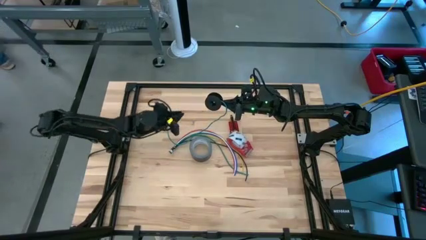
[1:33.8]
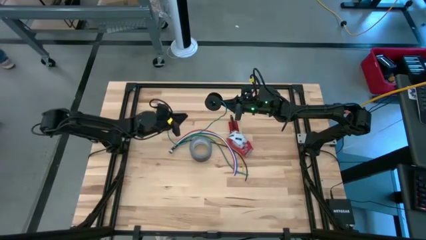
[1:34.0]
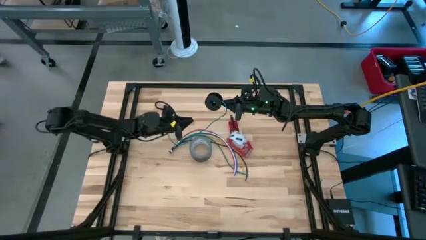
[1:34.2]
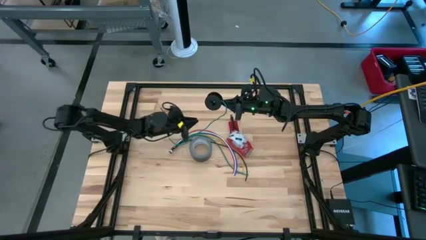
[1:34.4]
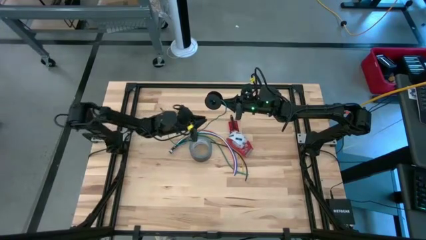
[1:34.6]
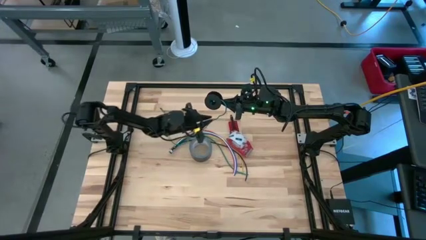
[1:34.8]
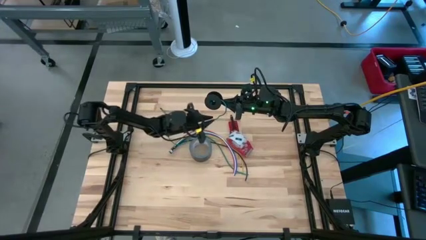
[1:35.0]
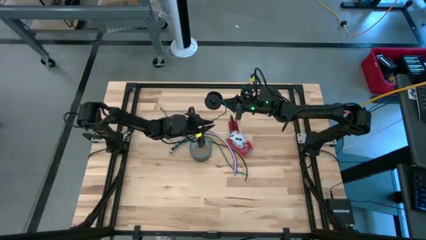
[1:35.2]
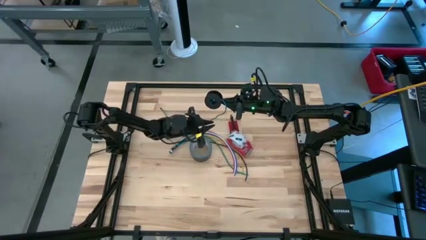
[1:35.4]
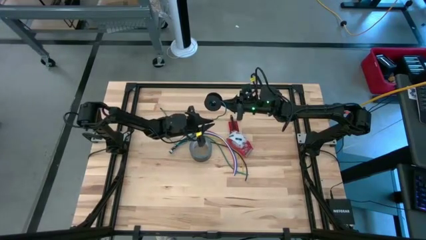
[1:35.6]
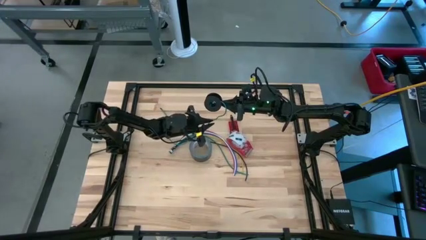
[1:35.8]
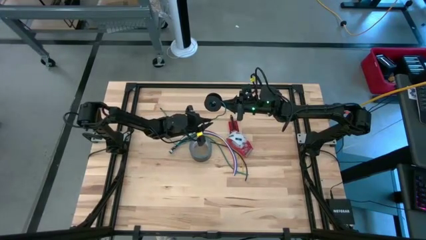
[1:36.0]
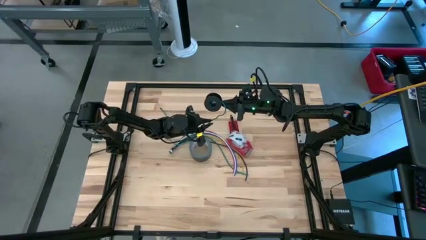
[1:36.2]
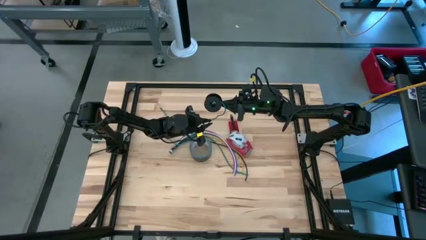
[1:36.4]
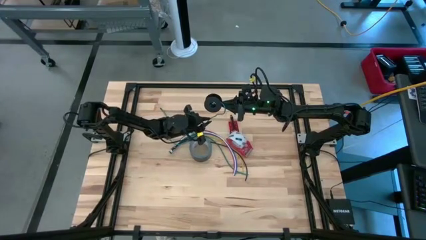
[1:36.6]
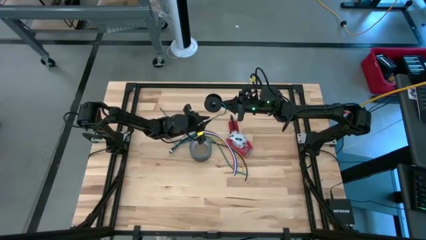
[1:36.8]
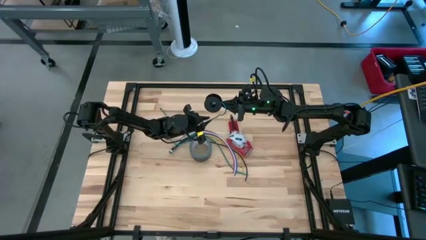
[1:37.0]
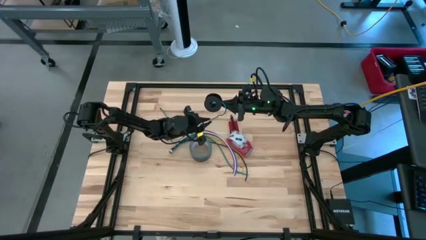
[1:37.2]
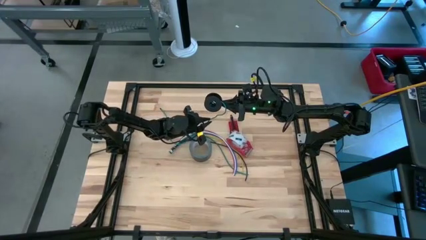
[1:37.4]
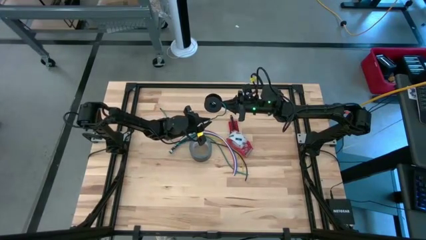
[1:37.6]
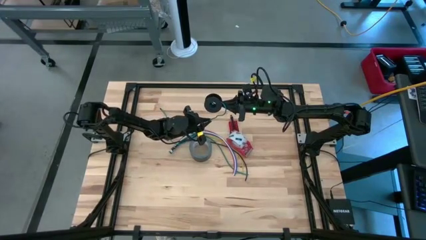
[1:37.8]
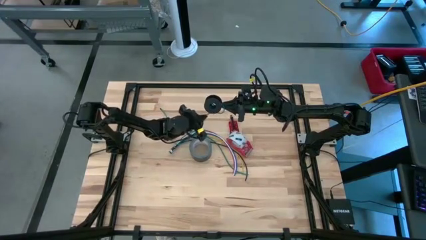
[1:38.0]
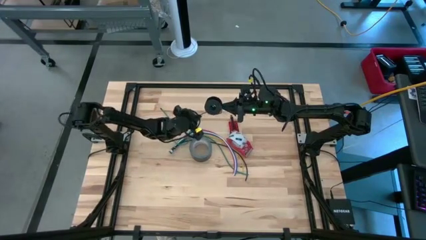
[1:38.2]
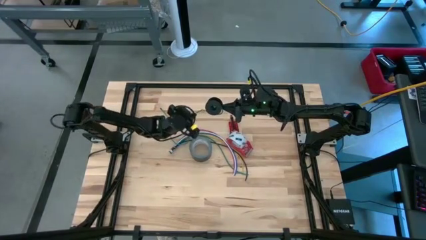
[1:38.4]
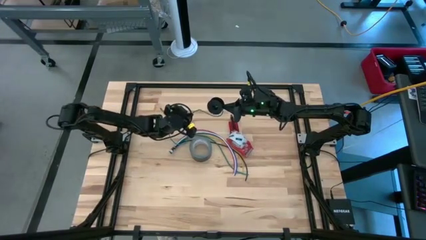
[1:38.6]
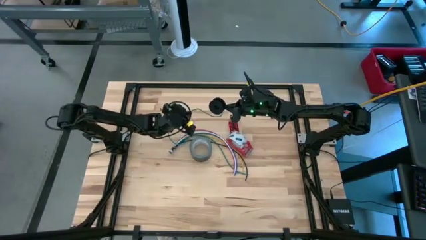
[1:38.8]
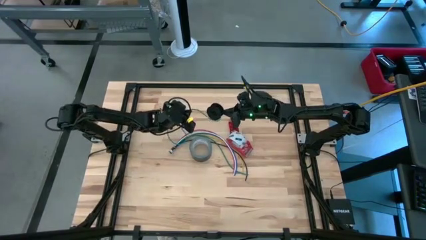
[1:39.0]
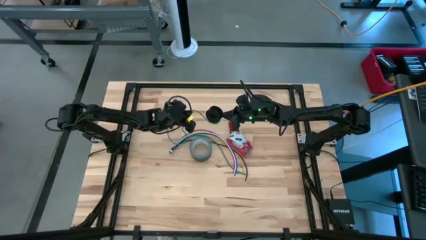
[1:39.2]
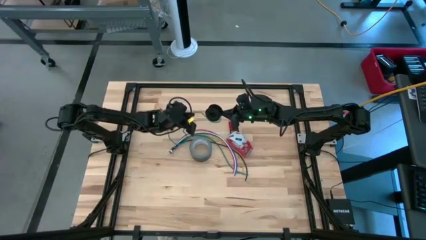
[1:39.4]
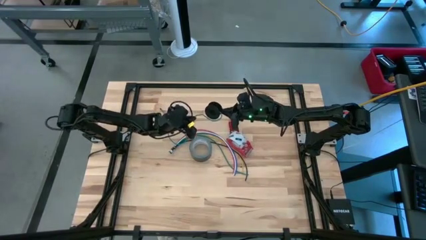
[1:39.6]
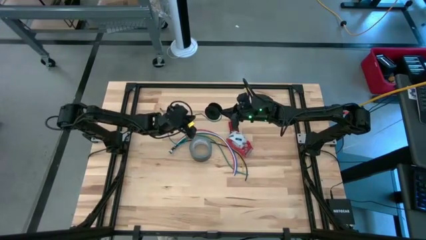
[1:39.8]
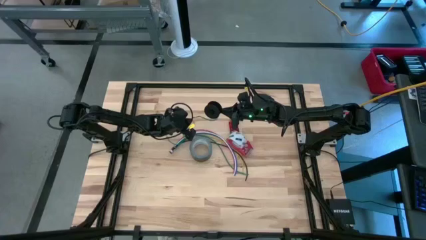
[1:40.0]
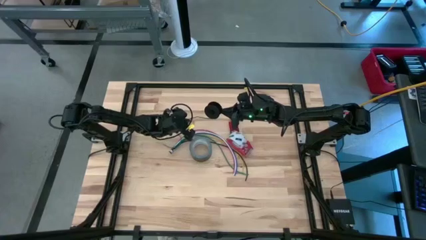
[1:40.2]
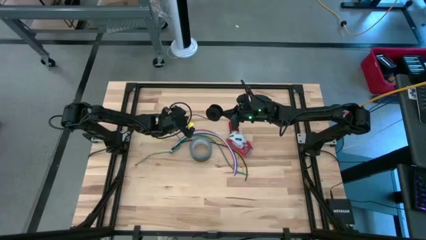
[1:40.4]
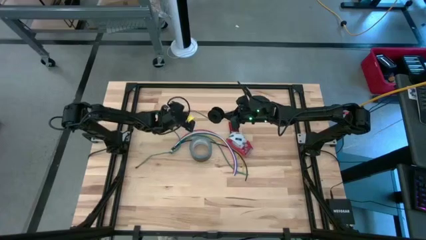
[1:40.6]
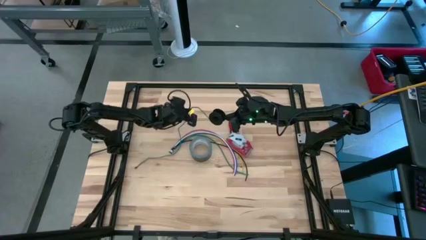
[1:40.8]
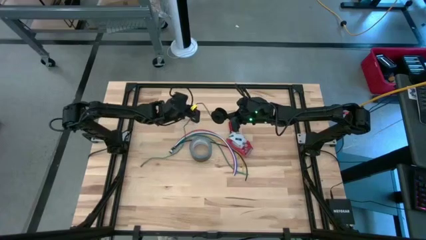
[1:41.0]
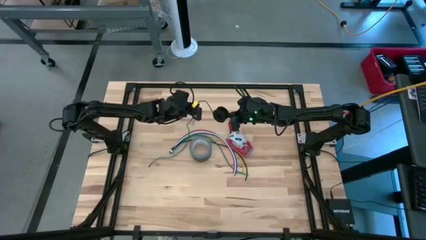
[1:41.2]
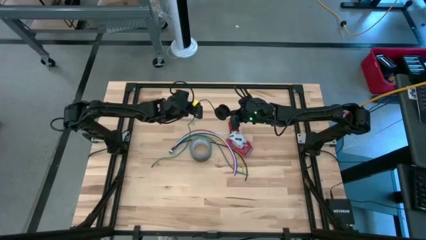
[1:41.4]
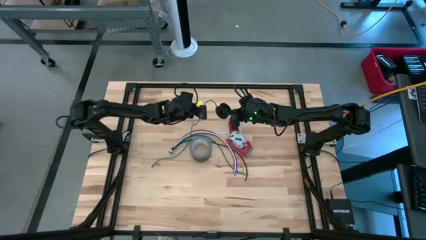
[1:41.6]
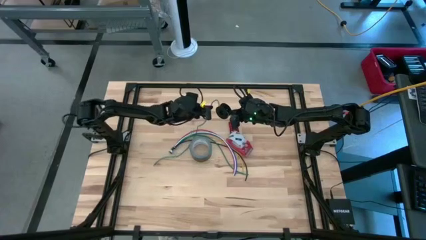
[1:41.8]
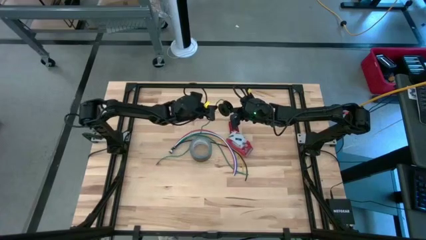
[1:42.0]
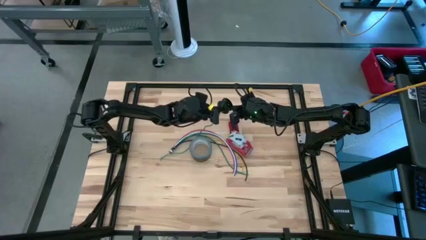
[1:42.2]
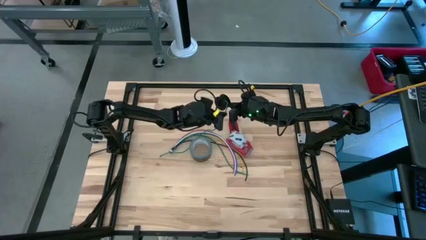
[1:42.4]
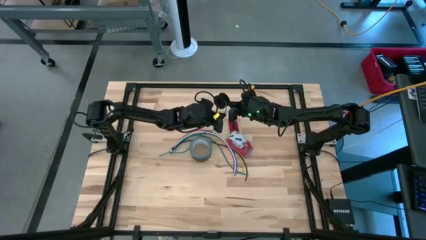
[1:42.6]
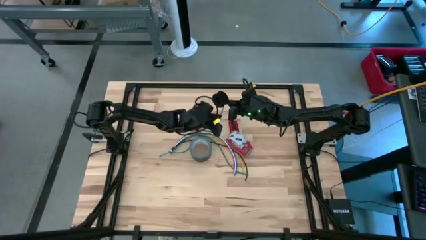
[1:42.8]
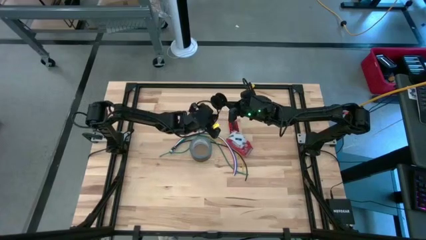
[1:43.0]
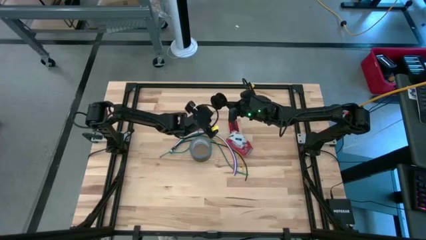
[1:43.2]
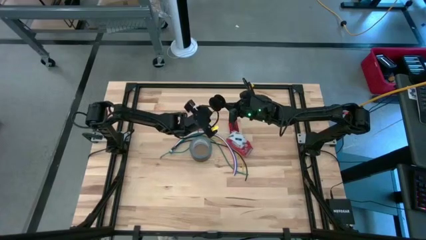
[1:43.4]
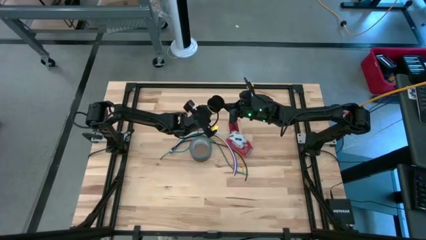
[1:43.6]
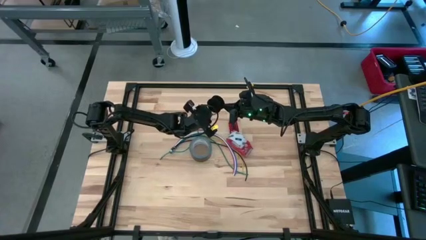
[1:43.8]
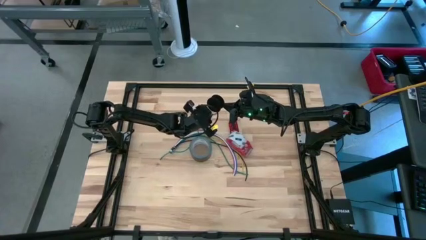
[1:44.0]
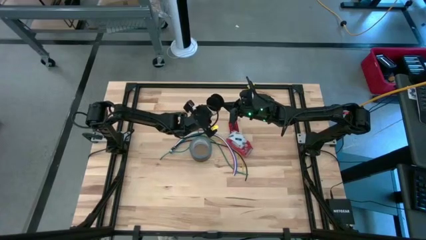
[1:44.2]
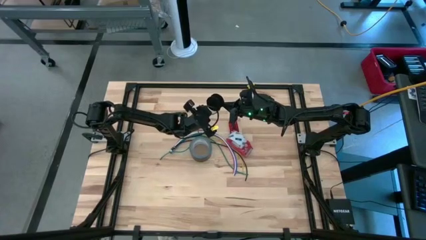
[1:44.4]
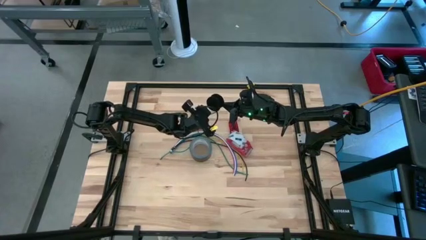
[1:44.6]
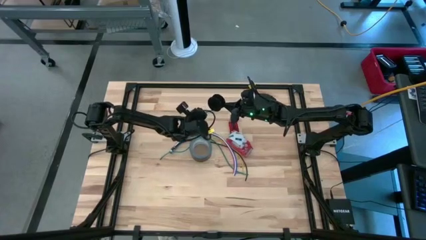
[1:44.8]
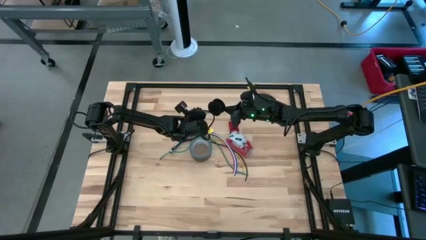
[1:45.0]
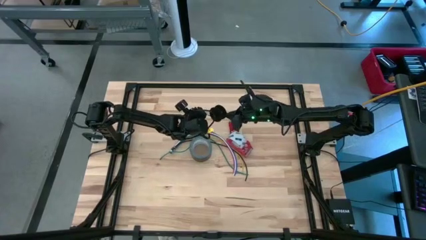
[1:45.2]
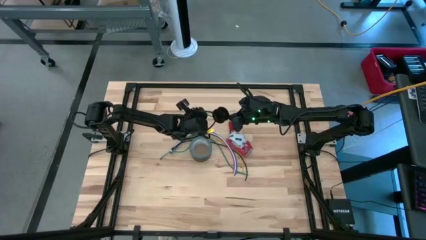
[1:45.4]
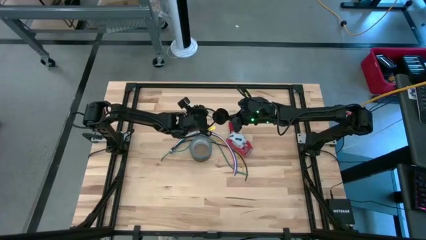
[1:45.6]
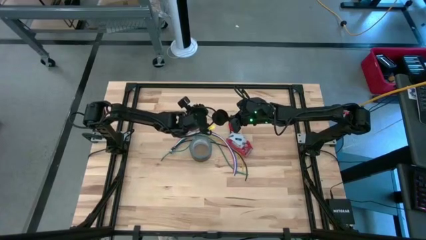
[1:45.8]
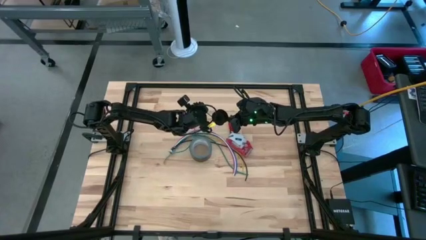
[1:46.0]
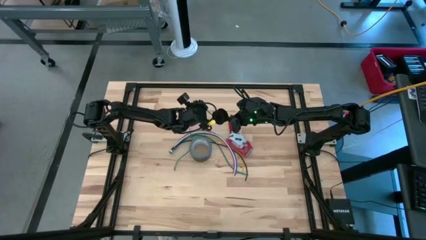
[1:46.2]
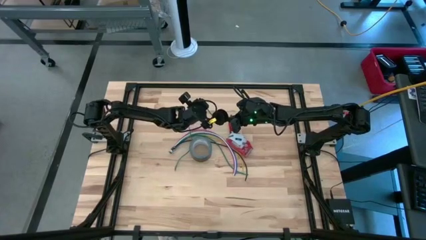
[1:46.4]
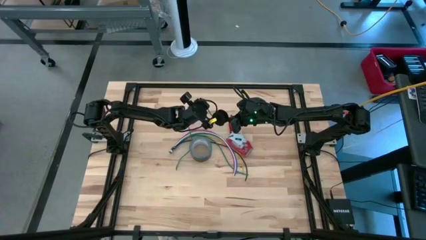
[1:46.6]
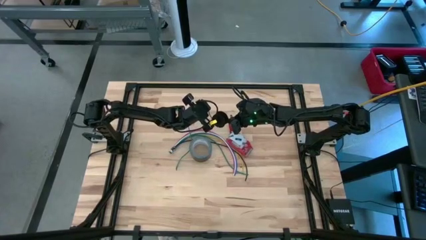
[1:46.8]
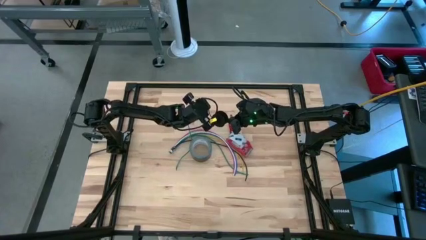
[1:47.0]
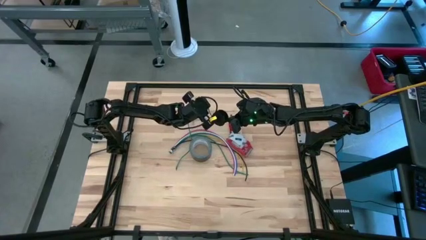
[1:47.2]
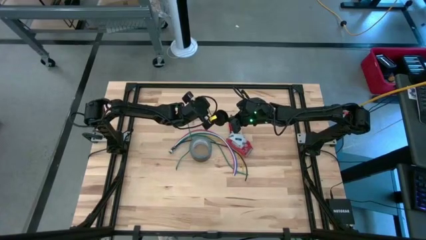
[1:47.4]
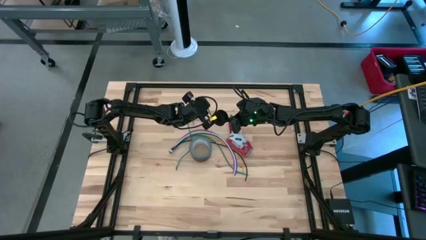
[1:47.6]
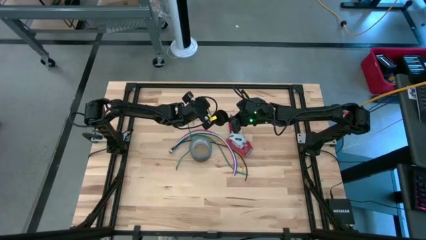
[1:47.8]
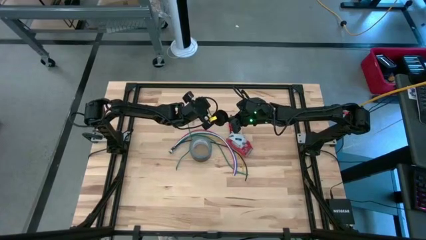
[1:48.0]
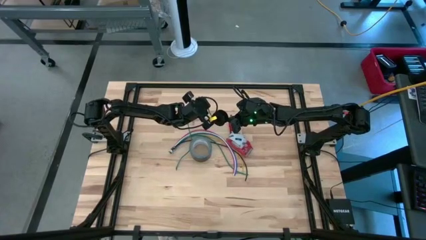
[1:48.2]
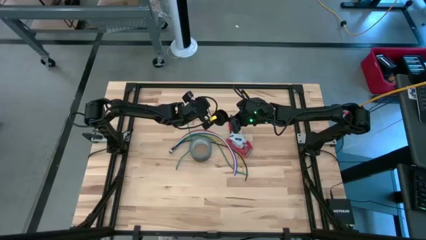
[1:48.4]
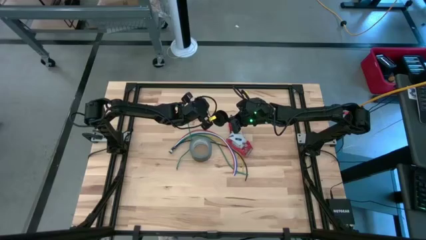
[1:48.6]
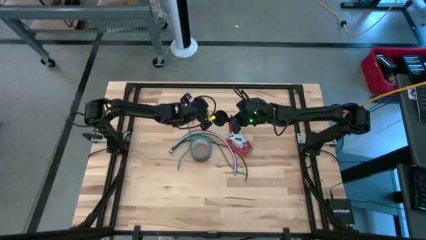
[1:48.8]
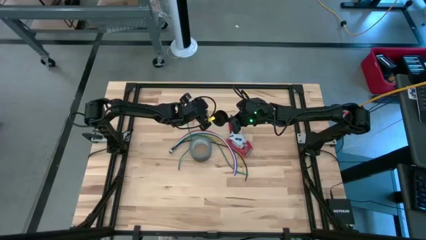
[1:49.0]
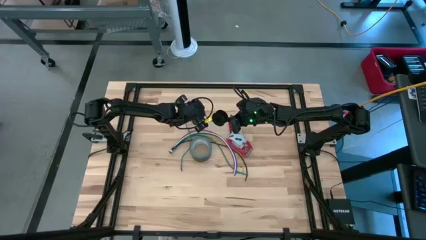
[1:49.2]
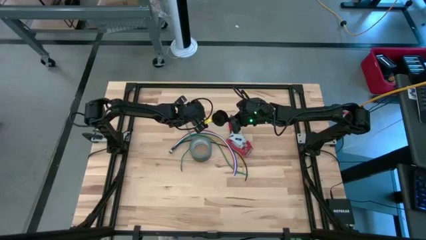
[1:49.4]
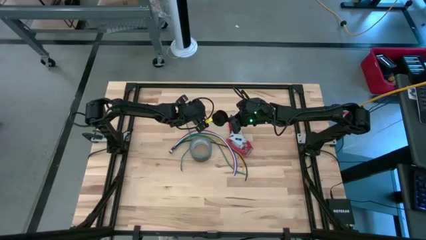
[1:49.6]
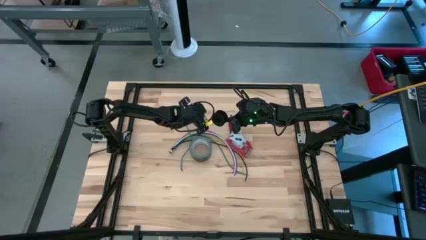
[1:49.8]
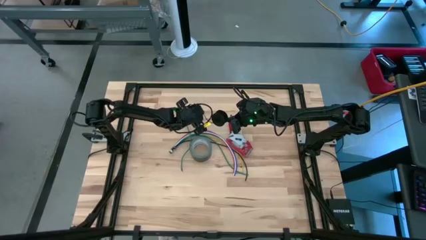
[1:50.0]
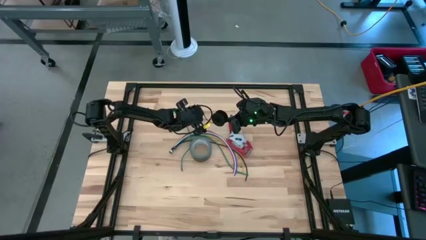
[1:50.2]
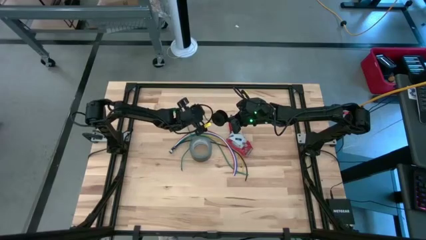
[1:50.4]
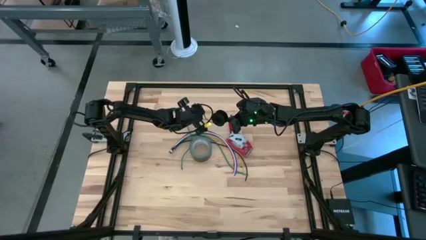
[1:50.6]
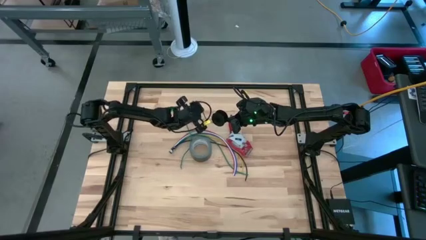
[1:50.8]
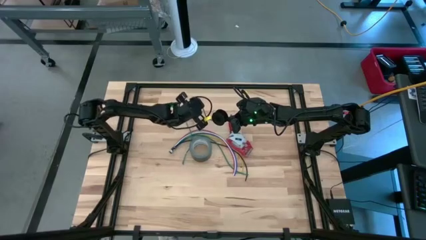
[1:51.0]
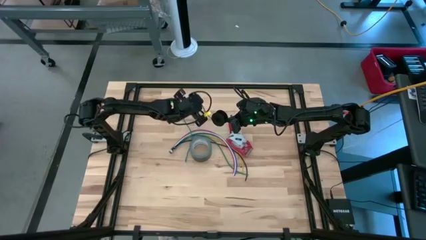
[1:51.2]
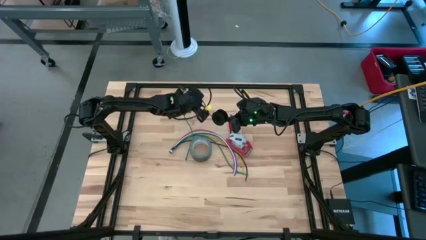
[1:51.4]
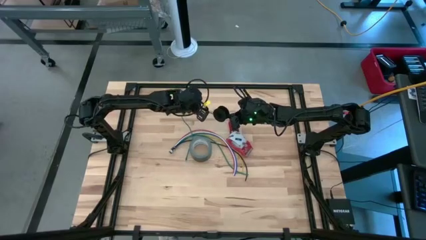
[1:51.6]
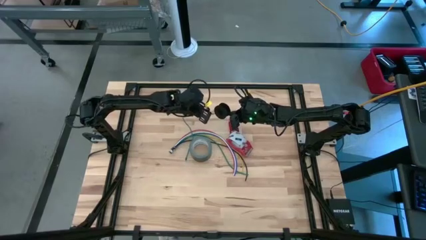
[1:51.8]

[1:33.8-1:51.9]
Task: Coil cords
Coil the green wire onto the black spool
